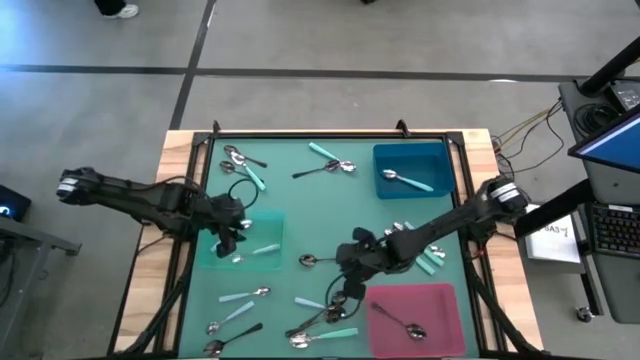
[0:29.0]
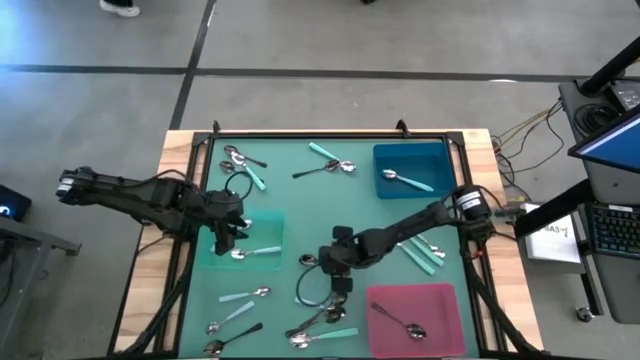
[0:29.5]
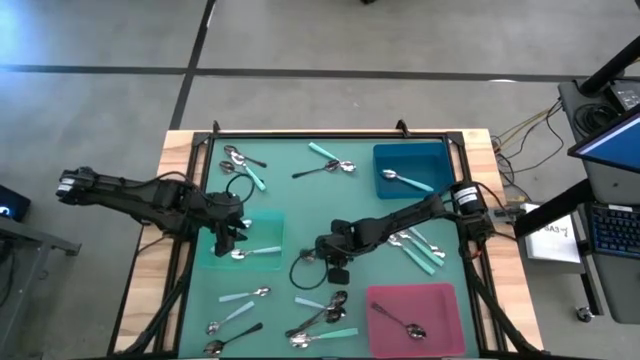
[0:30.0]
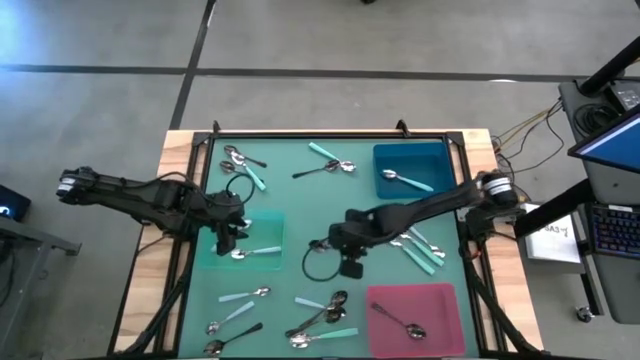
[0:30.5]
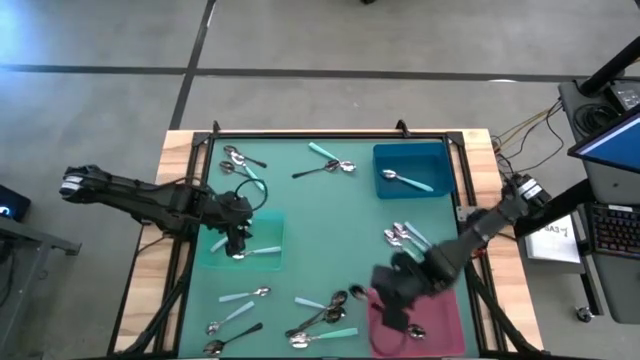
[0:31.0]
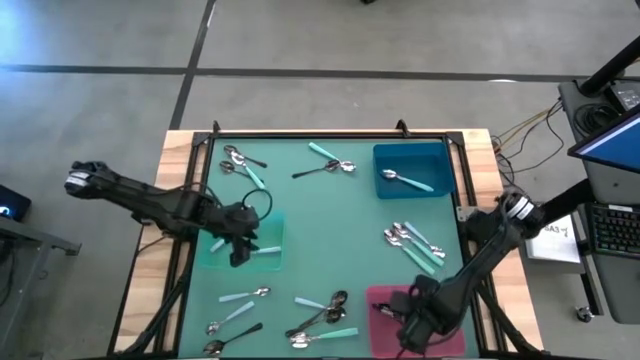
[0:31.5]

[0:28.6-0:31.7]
Task: Sort silverware by color (type)
Put the black spoon into the red bin

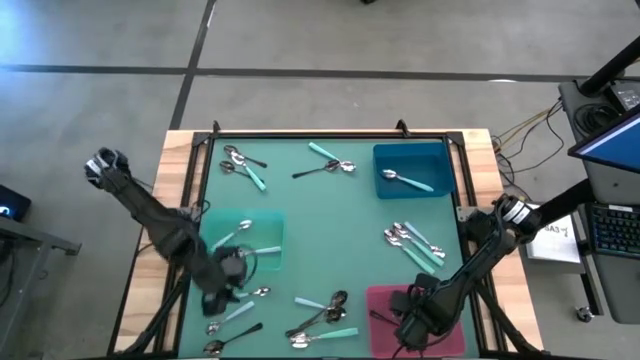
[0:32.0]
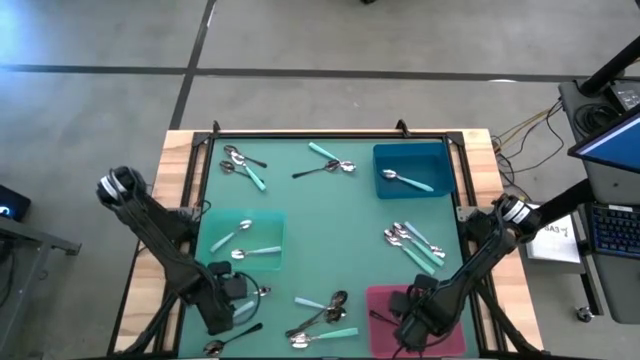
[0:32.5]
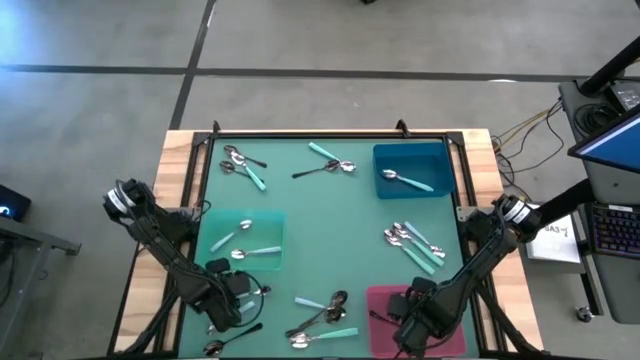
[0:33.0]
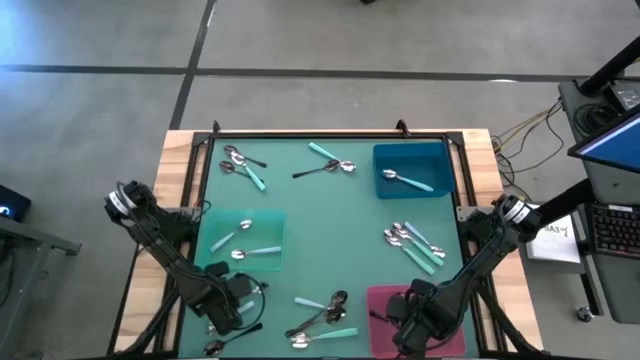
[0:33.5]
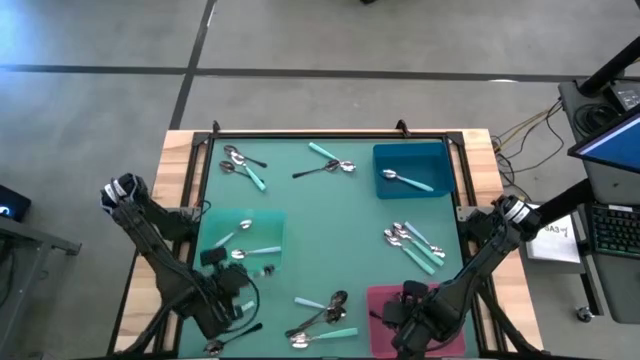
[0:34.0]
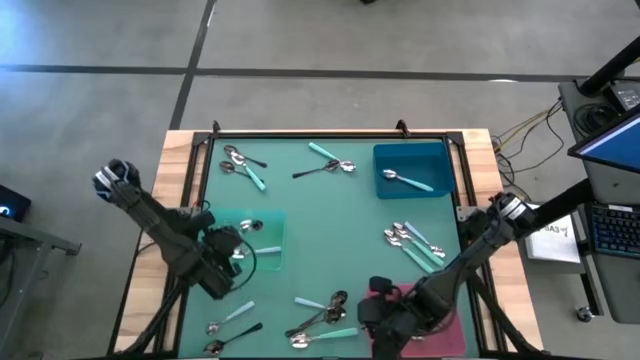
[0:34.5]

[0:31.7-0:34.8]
Put the blue spoon into the green bin

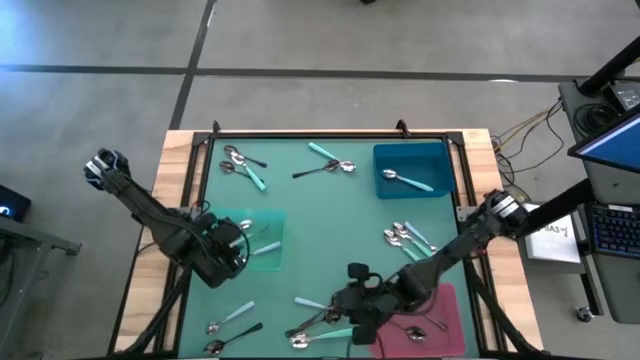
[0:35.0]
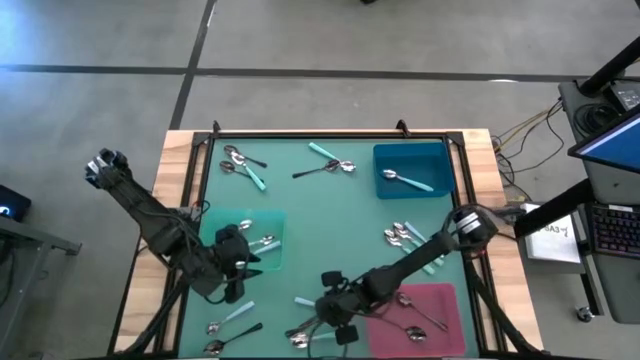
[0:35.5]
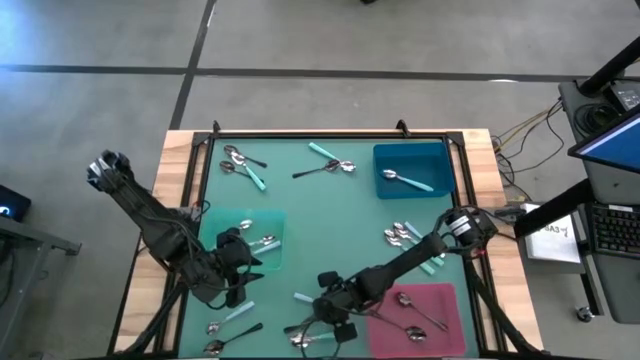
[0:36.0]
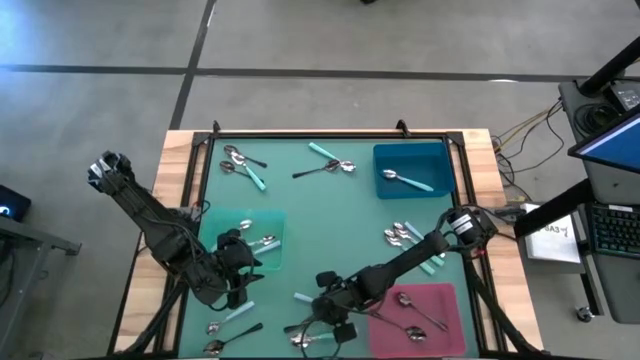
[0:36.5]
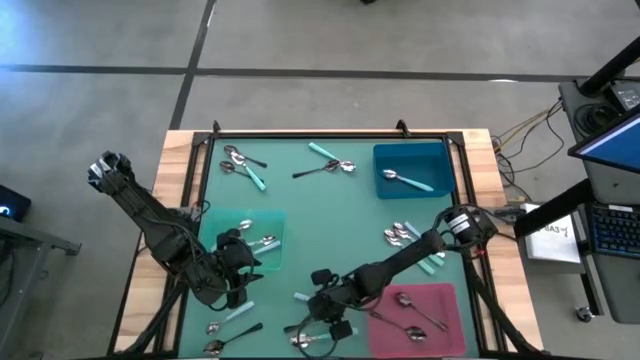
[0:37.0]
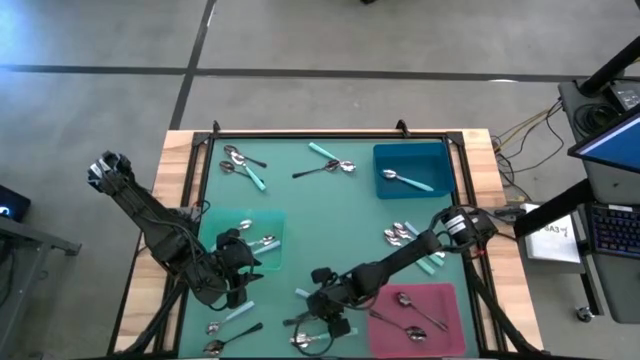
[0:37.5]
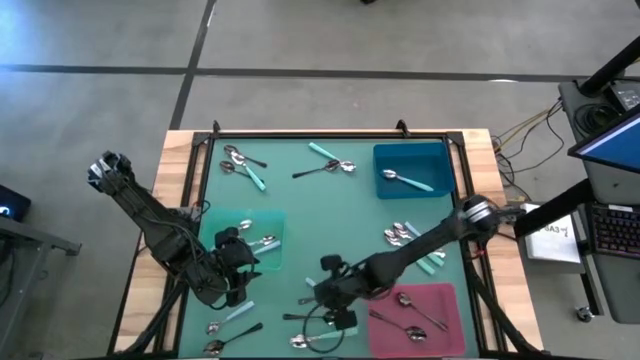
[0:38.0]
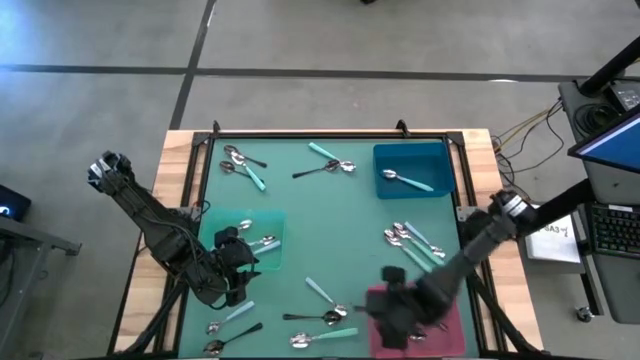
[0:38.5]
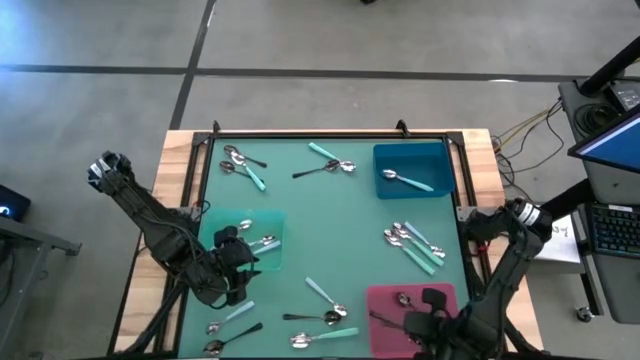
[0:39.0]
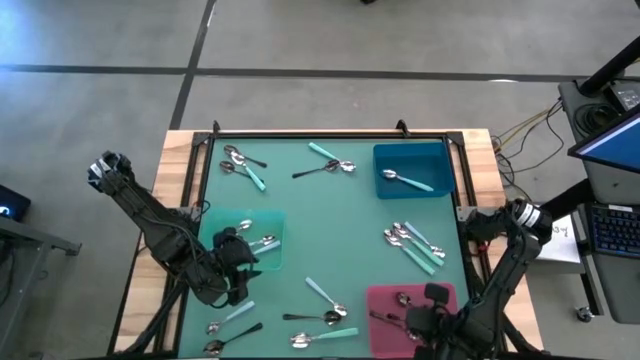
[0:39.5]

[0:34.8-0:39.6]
Put the black spoon into the red bin

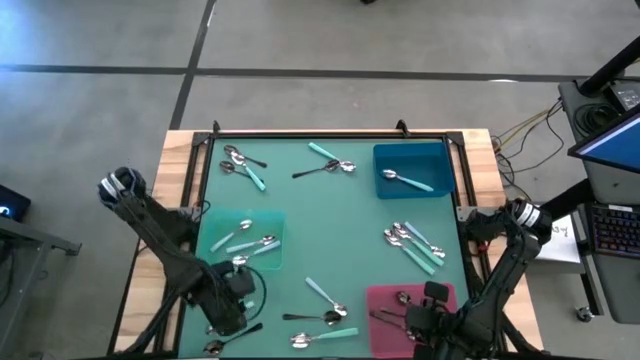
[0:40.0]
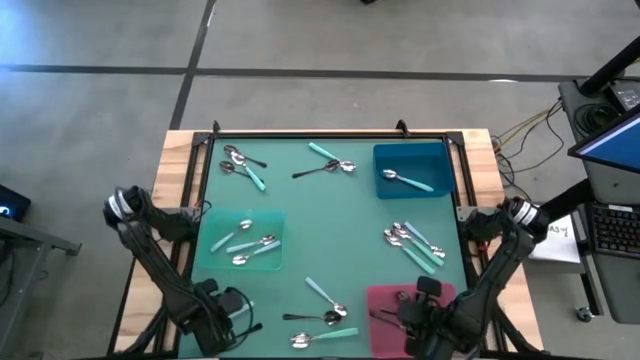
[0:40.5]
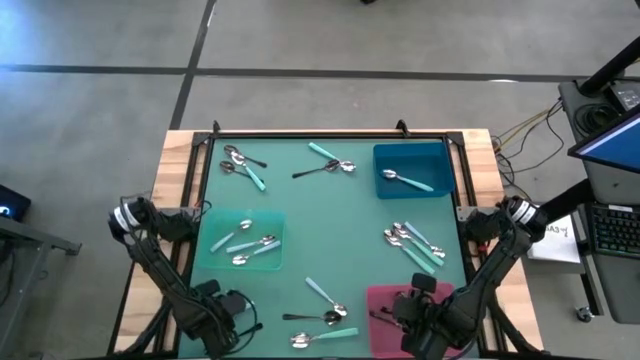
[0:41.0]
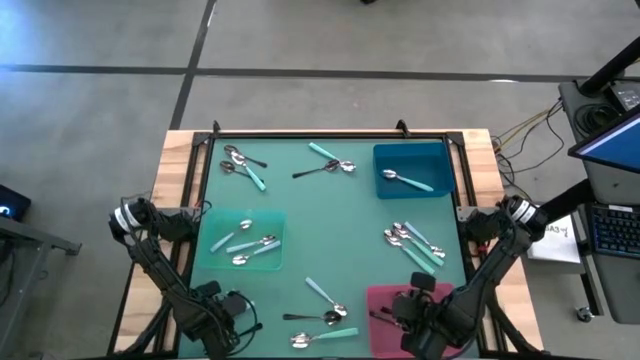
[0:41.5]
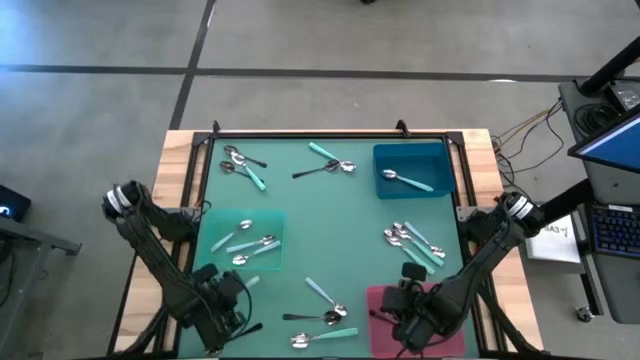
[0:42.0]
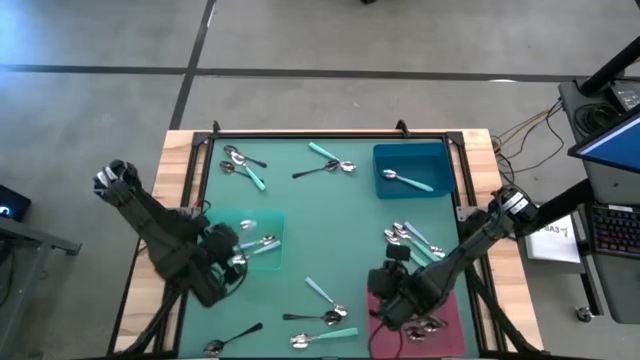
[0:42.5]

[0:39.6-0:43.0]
Put the blue spoon into the green bin

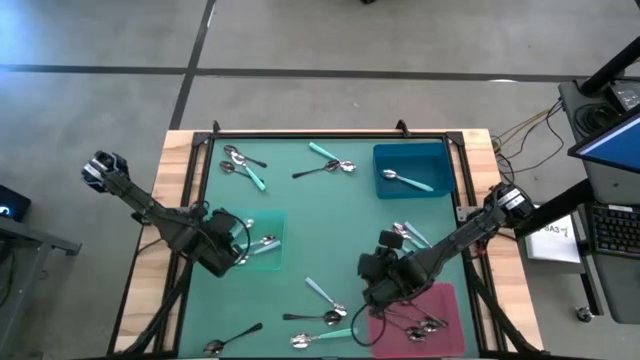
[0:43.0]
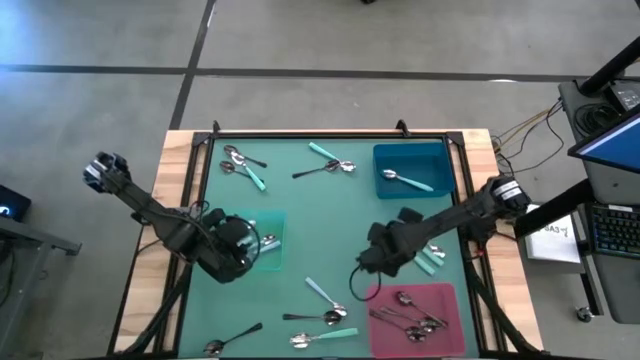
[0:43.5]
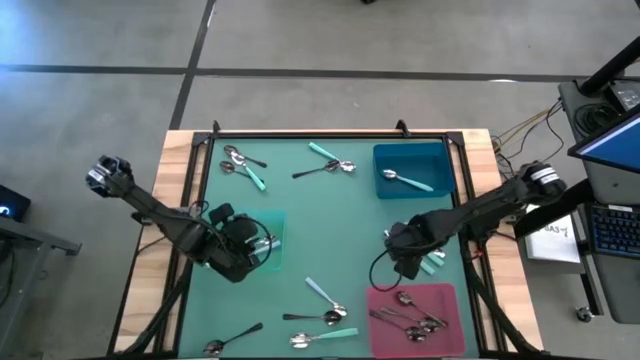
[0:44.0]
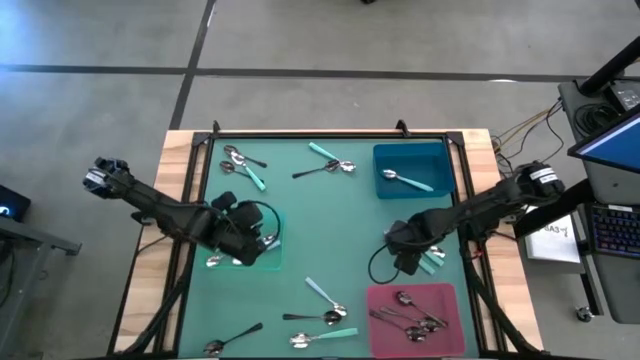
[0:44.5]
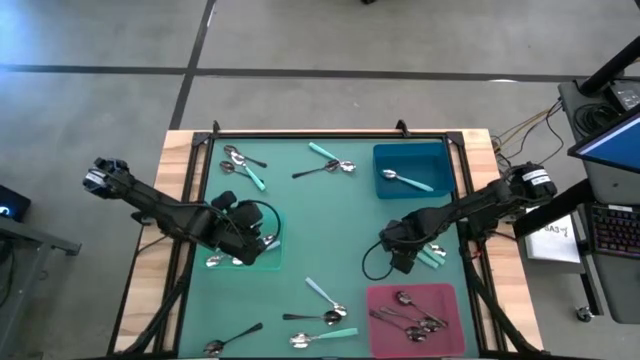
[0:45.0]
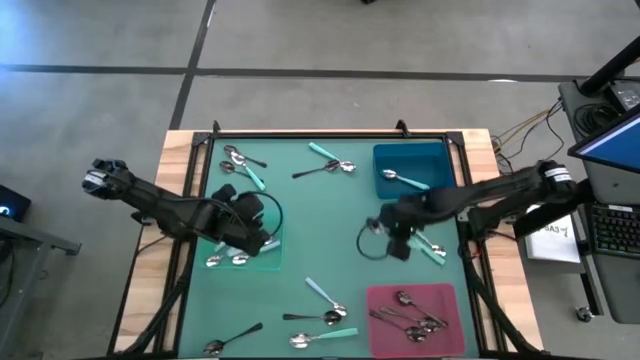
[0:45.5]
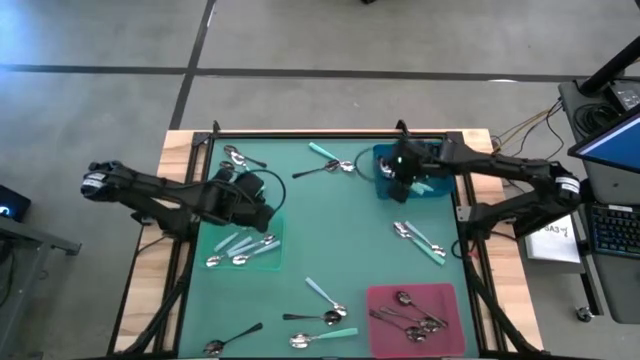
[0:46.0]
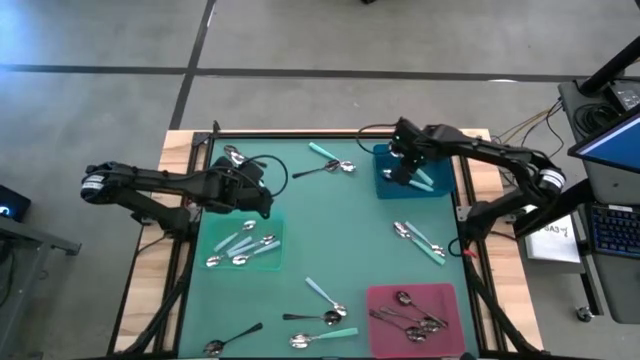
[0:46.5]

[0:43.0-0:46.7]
Put the green spoon into the blue bin

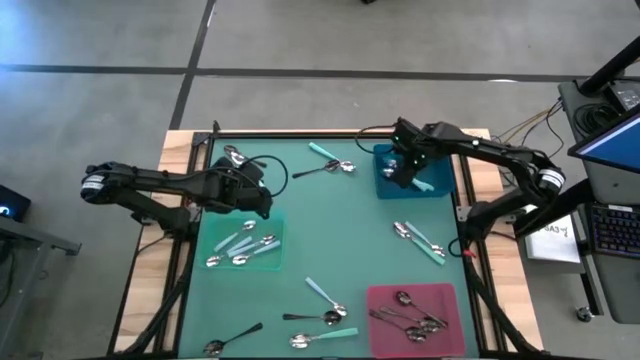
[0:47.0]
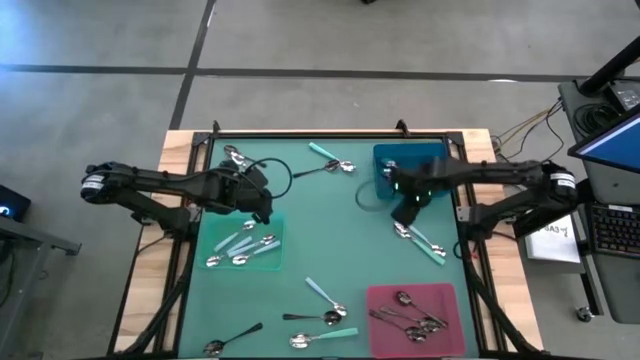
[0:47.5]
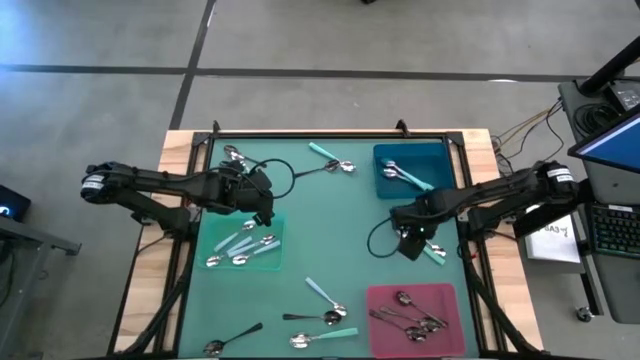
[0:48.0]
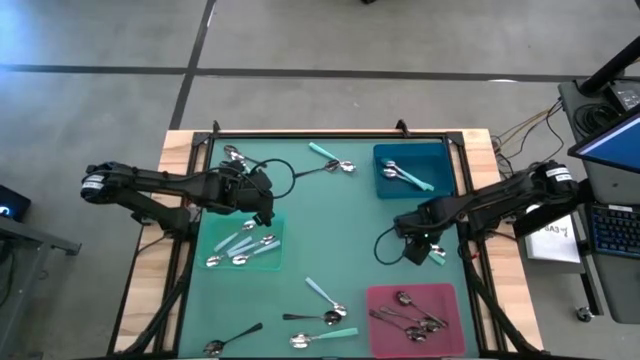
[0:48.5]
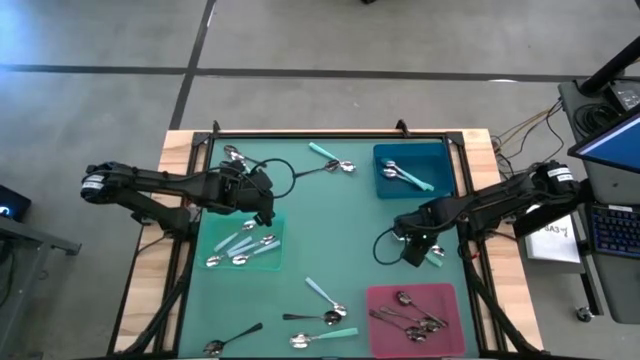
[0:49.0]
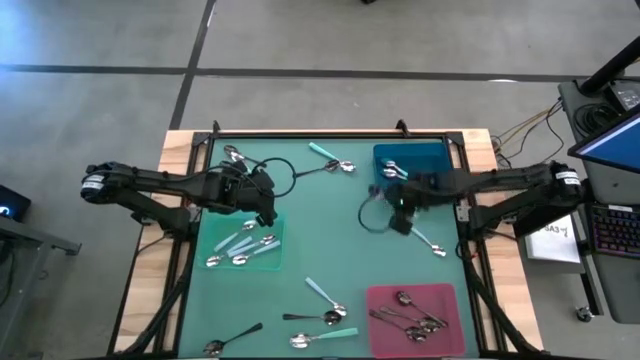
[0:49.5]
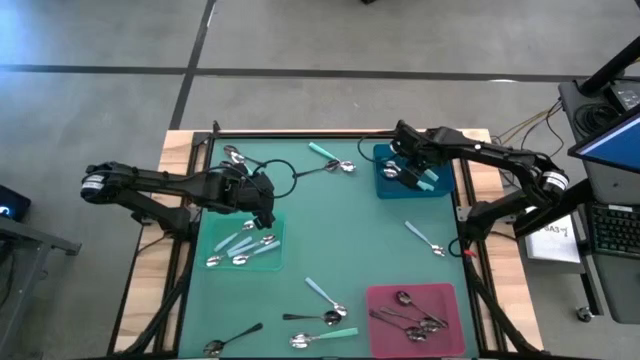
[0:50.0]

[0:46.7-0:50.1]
Put the green spoon into the blue bin
